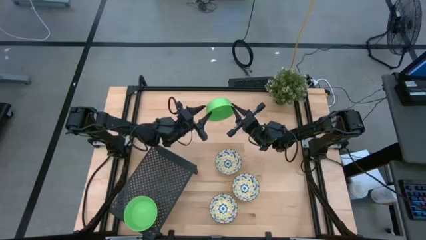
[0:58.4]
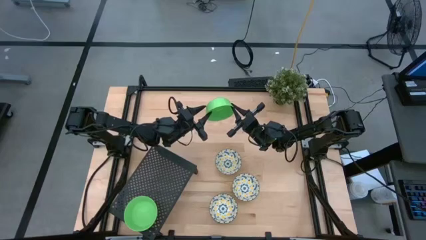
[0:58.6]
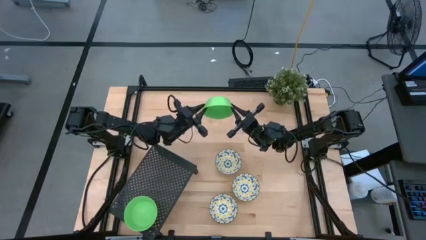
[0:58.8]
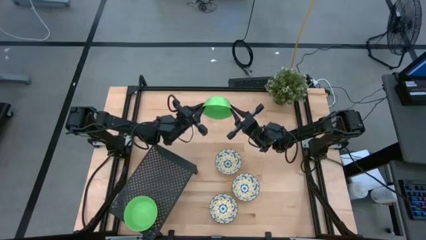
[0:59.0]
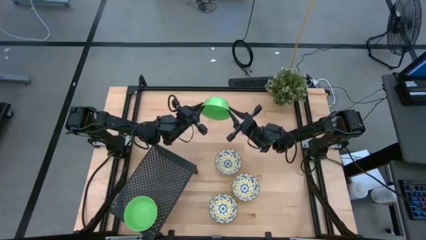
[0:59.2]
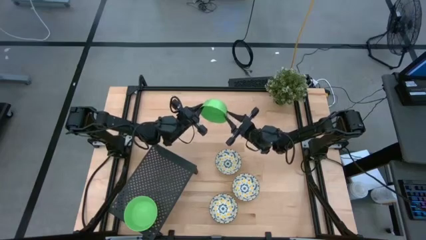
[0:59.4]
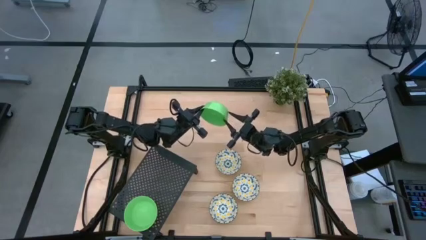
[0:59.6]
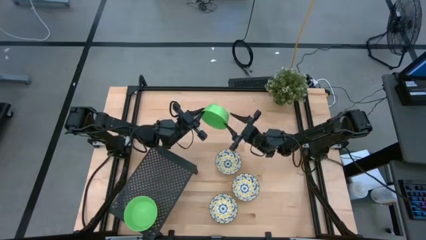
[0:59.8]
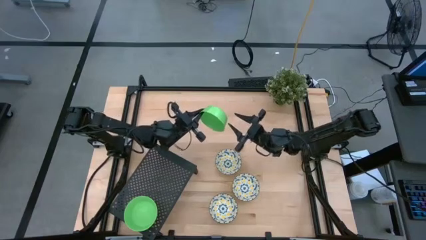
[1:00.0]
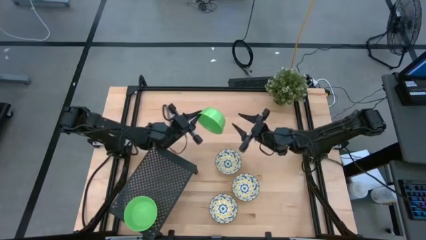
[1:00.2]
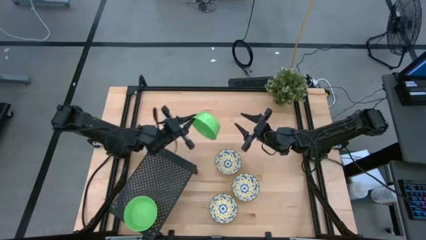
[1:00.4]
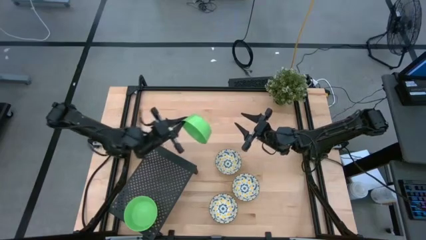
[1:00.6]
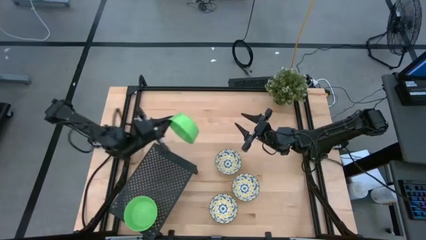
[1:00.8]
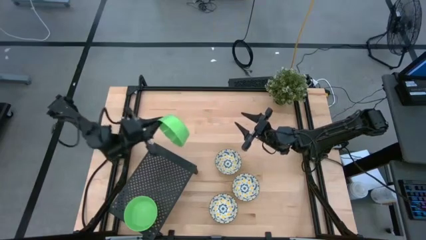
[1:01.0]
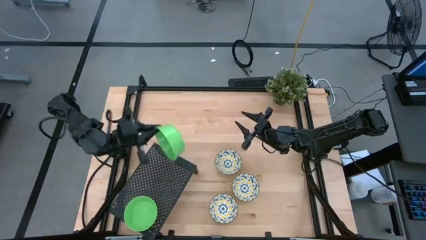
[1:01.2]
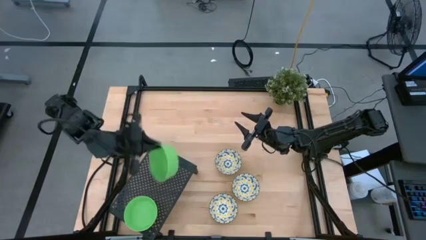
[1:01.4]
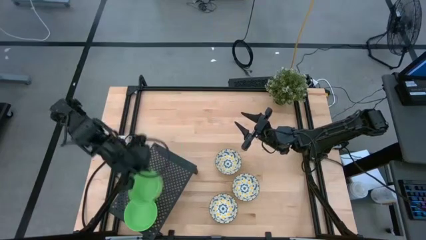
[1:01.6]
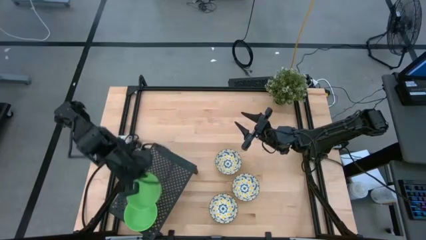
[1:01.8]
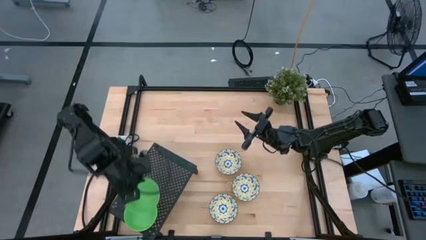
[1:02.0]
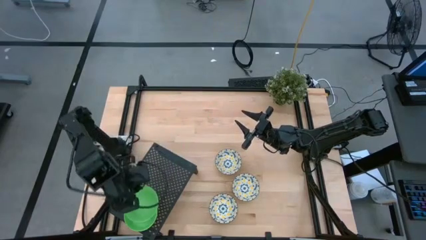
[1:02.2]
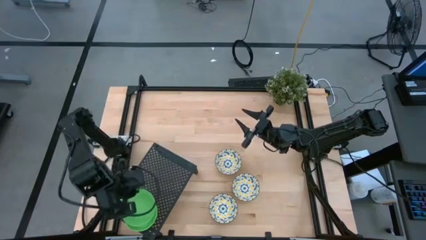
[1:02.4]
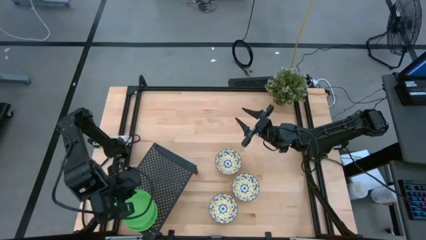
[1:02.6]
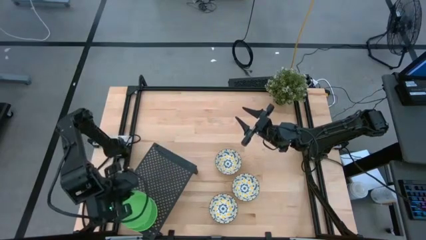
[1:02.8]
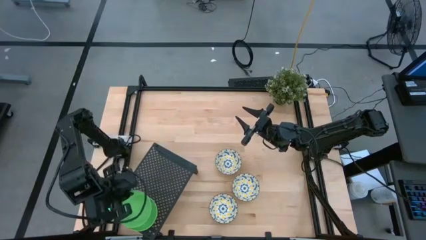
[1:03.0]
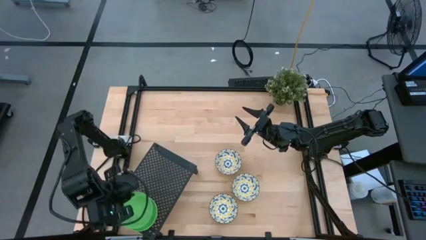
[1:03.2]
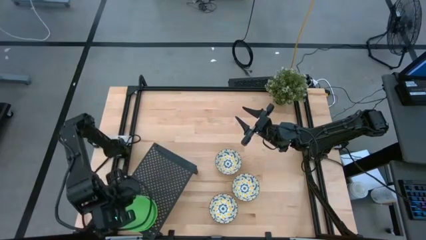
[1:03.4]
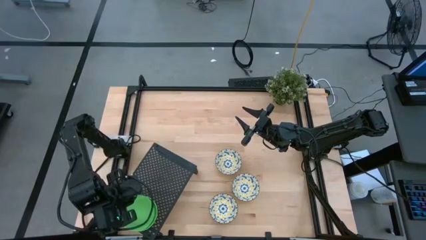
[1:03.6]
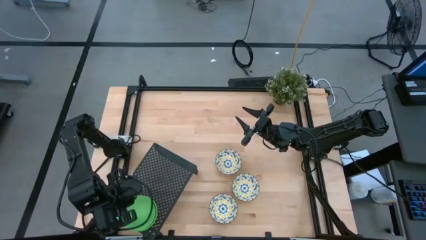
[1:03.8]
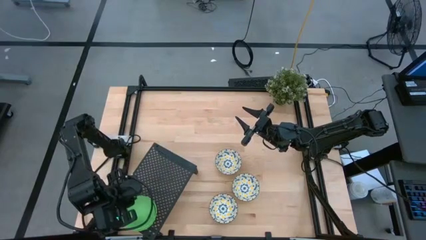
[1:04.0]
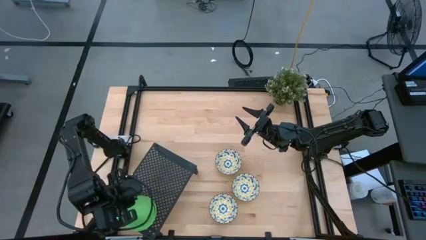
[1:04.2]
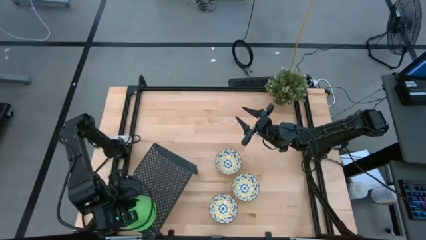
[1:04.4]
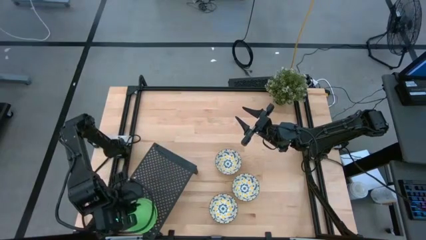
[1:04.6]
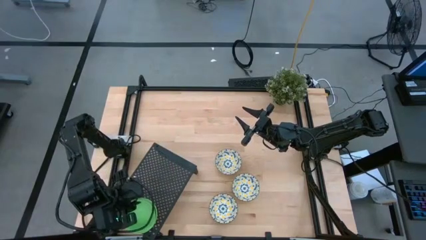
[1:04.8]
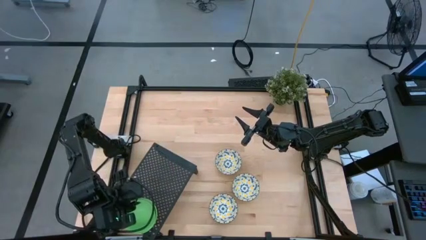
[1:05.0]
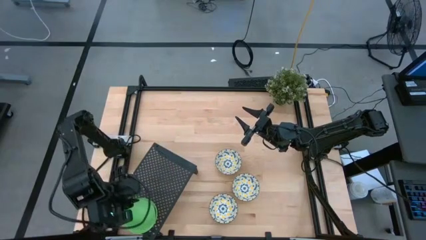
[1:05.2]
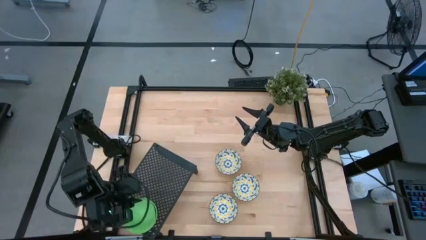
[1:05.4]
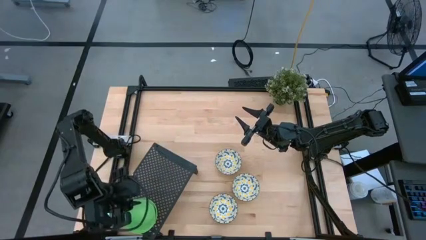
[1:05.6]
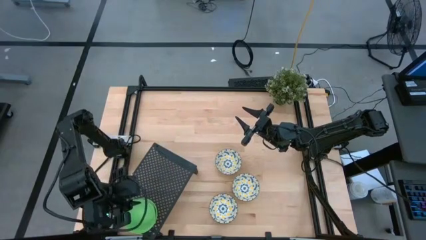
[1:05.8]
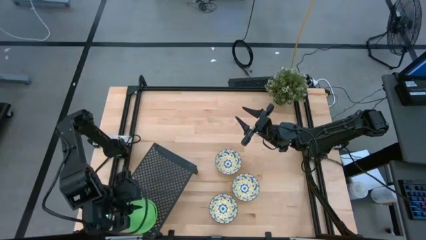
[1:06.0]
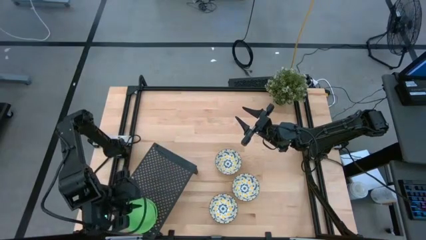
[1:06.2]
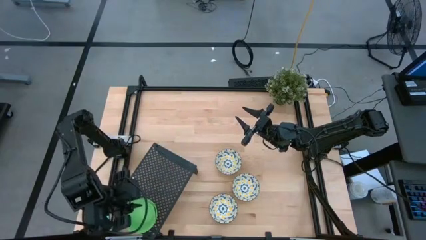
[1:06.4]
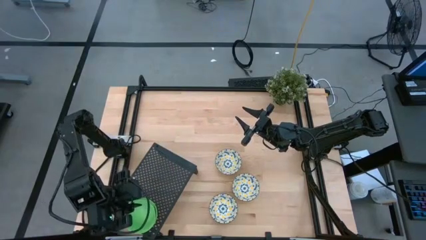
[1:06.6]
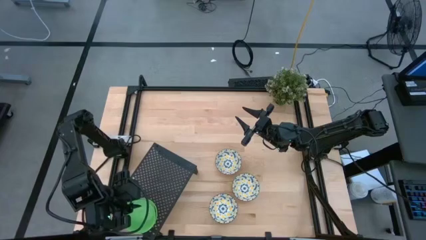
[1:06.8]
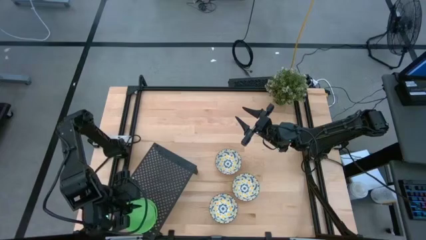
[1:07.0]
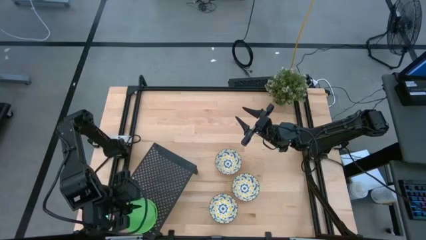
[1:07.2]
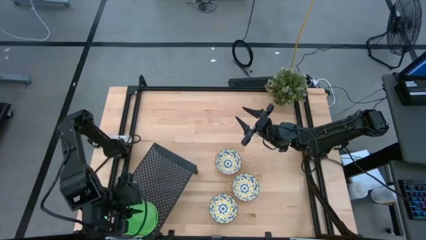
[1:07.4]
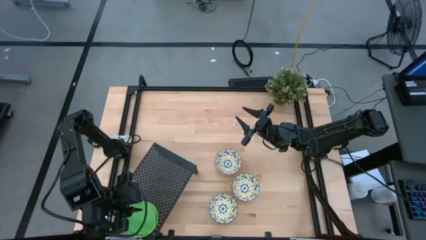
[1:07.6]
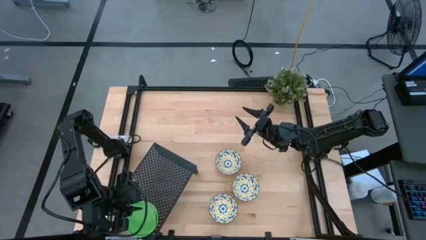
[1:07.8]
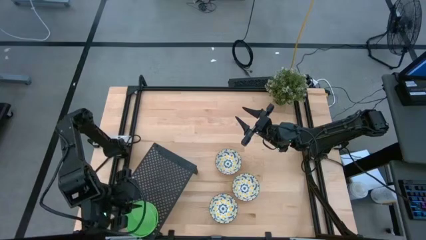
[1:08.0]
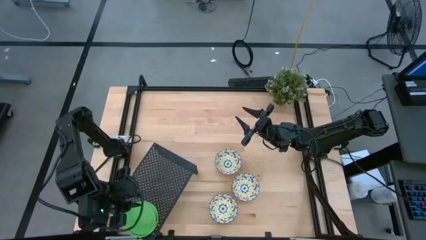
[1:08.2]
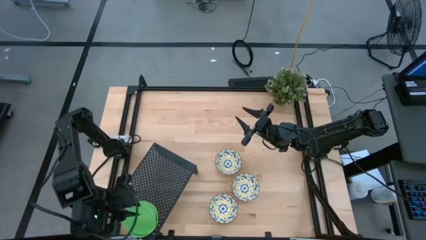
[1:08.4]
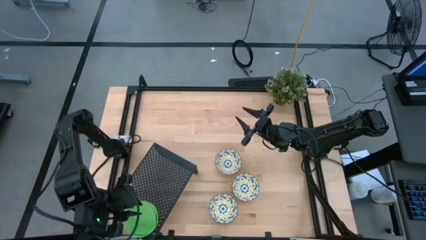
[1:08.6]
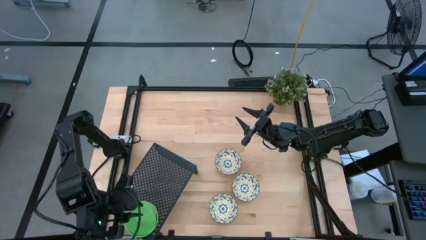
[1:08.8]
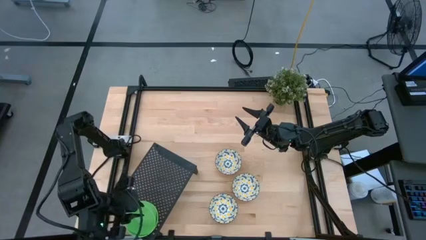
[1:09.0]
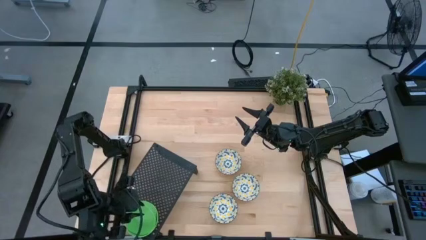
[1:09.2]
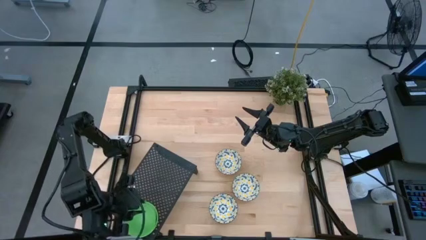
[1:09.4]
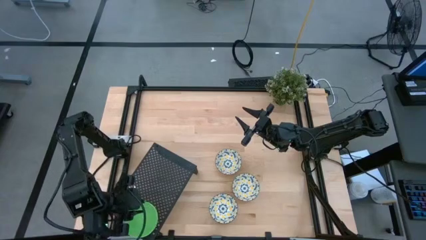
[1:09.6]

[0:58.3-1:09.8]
Task: Pick & Place Mini bowls
Stack the green bowl on the green bowls on the shelf

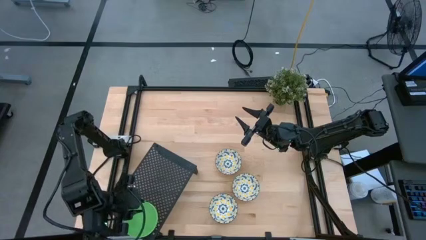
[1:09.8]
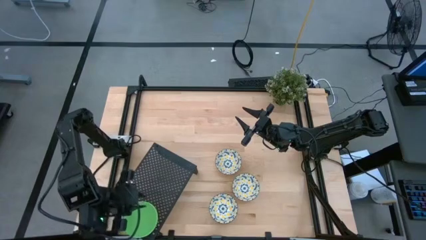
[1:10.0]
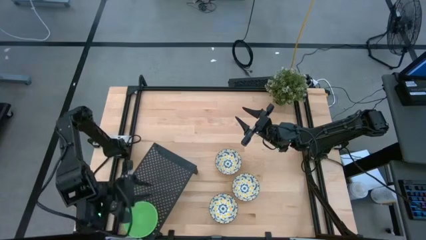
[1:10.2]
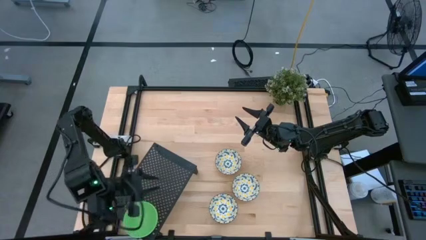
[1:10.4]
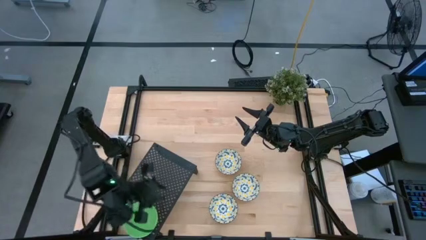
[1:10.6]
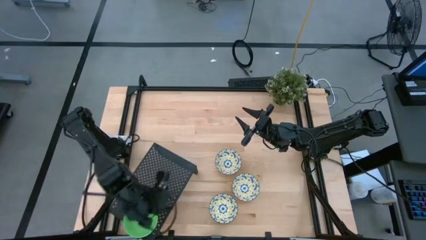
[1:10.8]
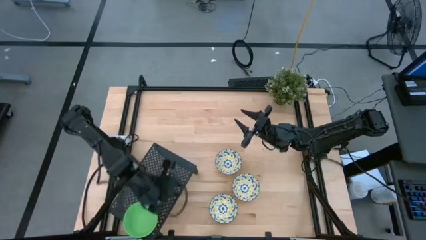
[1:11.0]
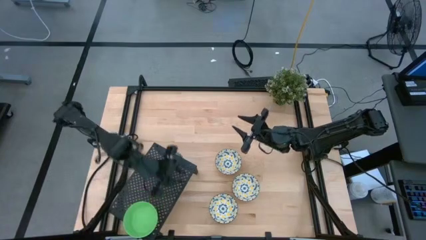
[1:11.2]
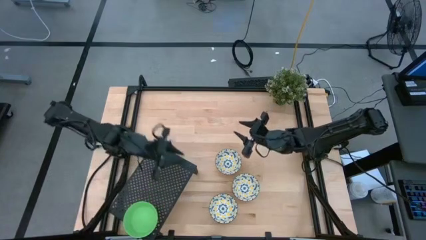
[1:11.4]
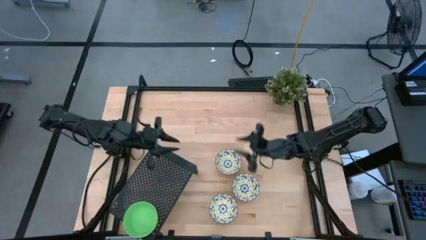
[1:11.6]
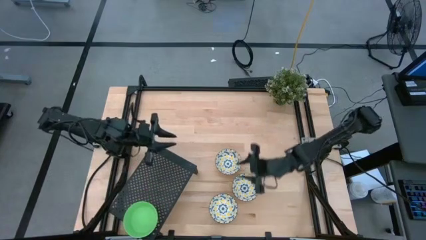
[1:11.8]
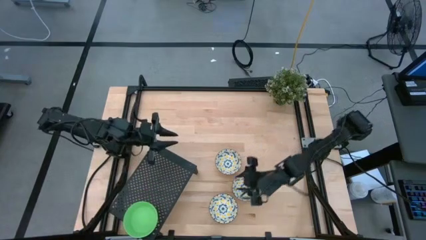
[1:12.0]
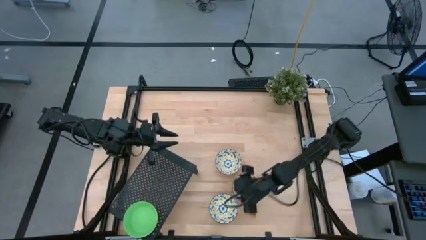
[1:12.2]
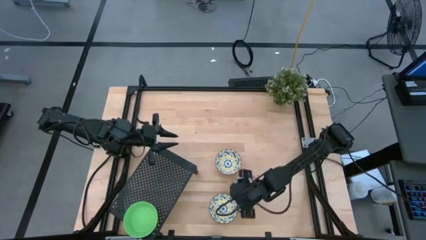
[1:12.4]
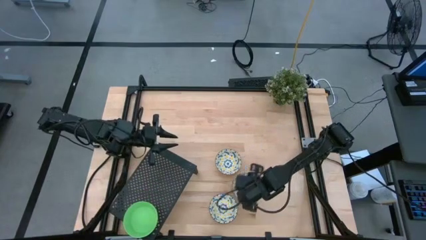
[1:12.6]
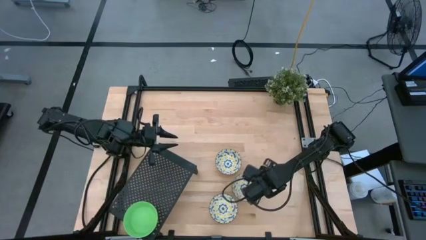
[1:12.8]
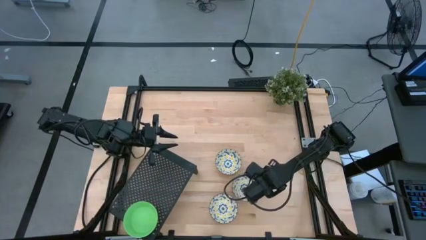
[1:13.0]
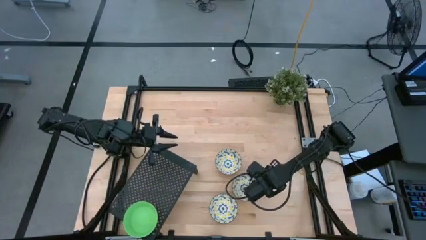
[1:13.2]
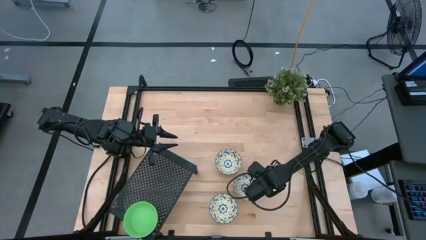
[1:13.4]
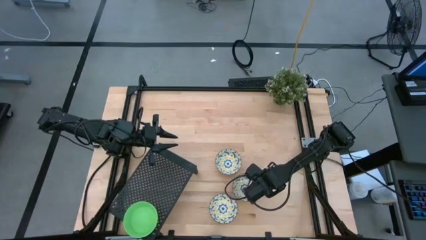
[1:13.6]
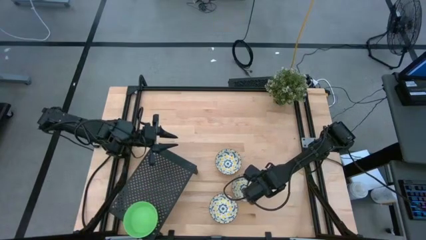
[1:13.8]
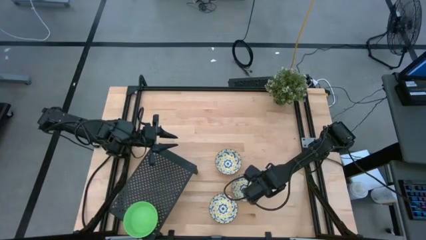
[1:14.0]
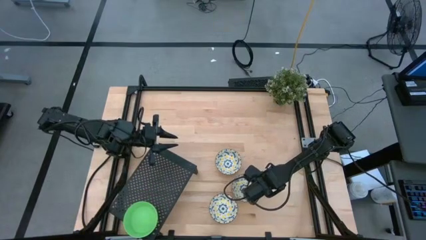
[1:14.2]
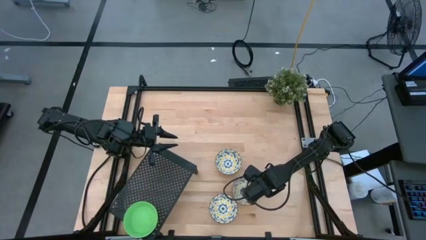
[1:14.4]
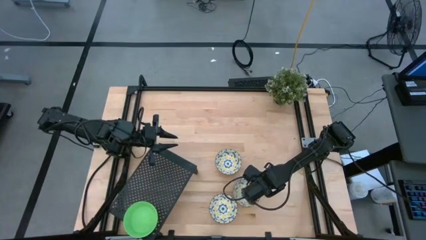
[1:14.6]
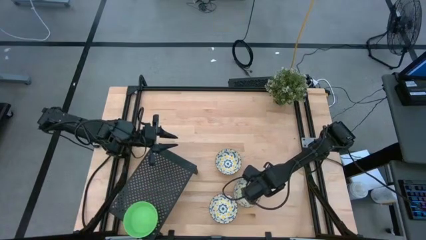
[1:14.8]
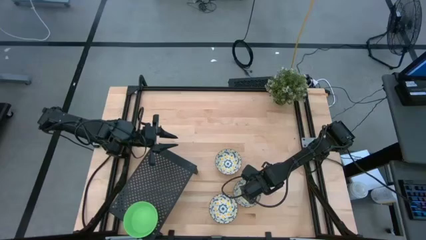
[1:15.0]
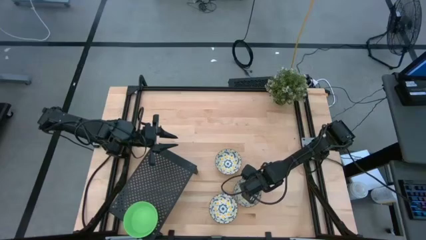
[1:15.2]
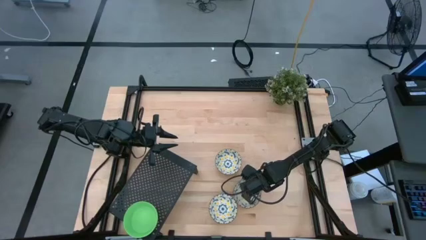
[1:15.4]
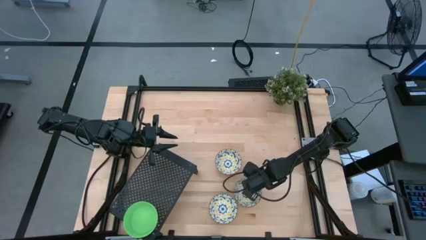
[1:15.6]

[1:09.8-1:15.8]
Put the middle yellow patterned bowl on the shelf
